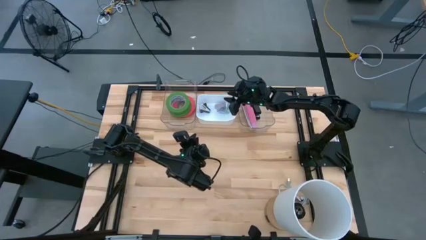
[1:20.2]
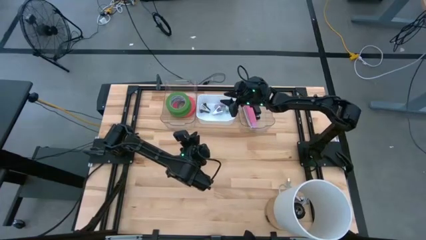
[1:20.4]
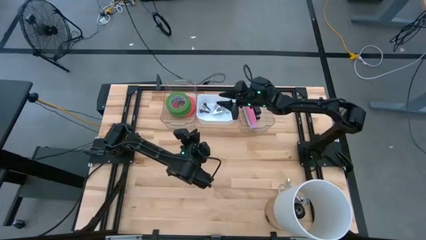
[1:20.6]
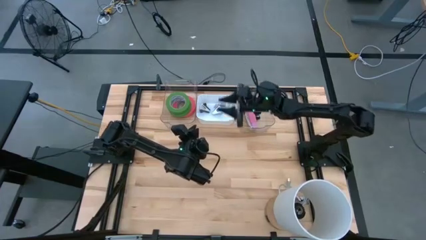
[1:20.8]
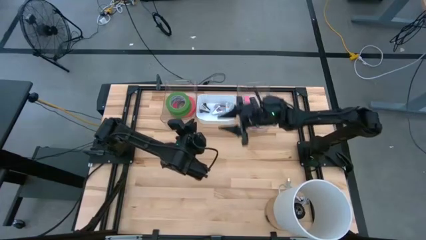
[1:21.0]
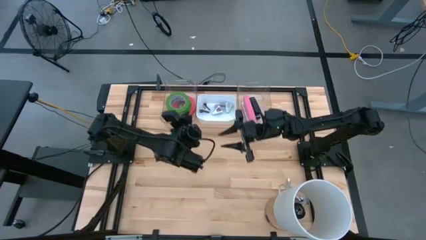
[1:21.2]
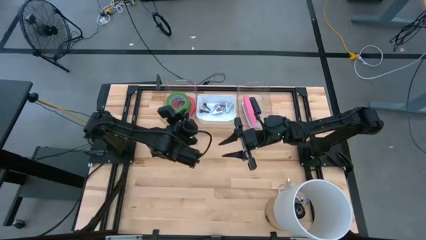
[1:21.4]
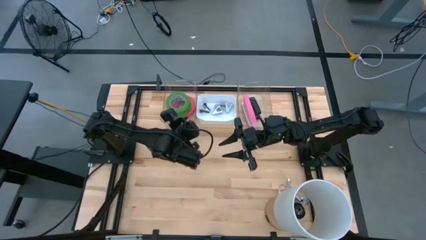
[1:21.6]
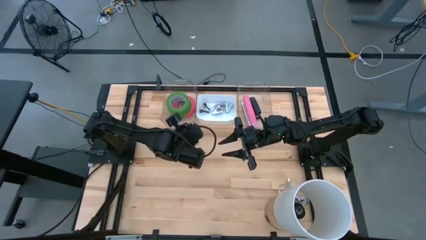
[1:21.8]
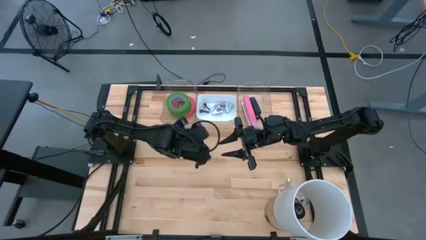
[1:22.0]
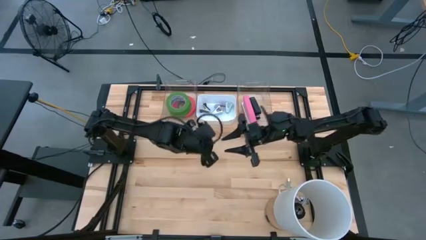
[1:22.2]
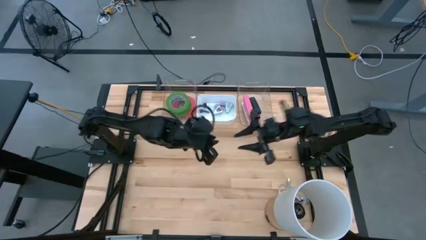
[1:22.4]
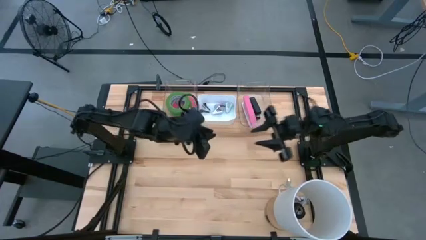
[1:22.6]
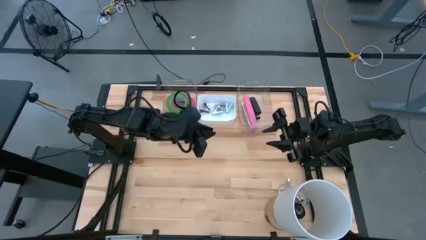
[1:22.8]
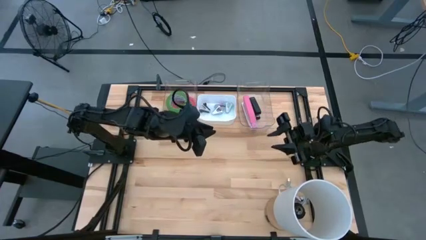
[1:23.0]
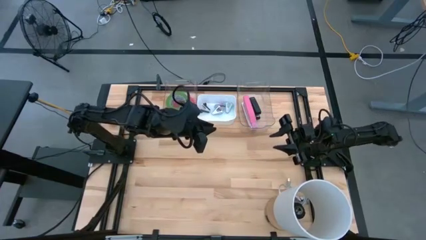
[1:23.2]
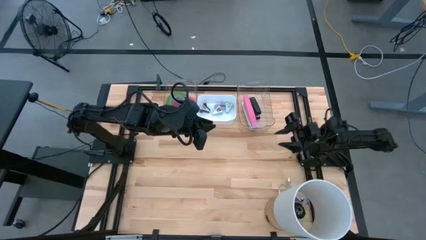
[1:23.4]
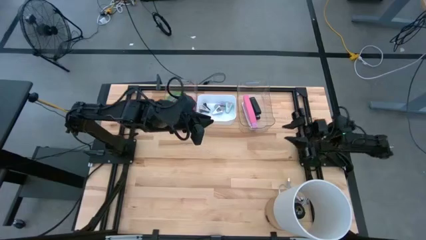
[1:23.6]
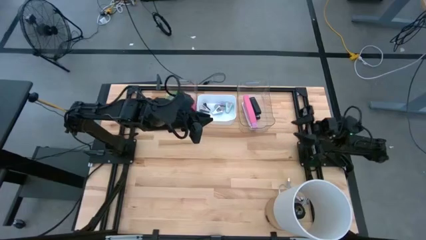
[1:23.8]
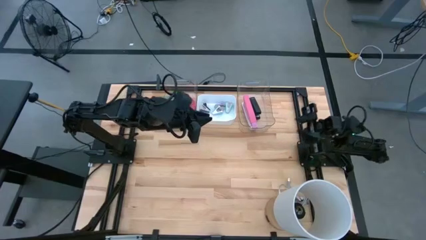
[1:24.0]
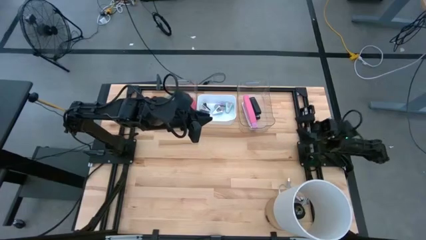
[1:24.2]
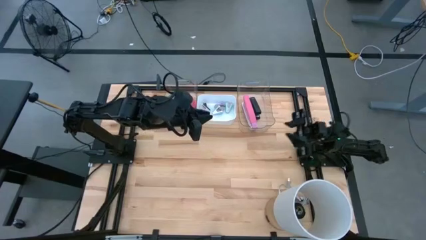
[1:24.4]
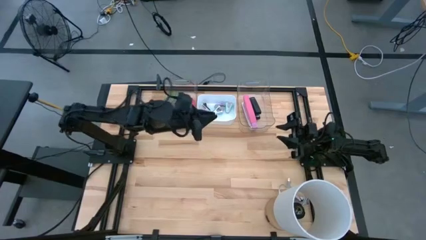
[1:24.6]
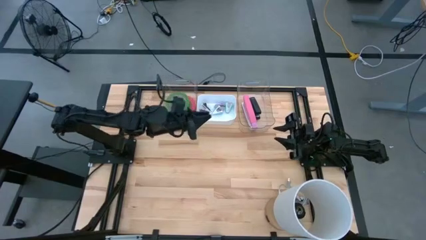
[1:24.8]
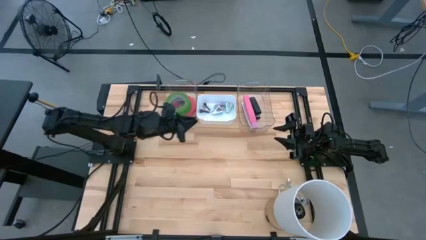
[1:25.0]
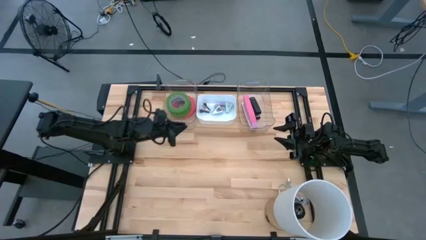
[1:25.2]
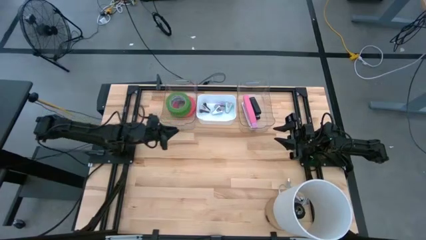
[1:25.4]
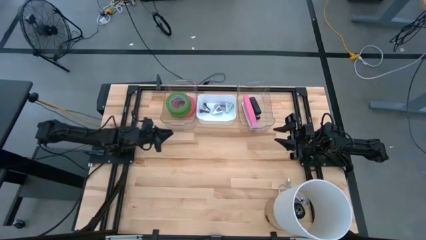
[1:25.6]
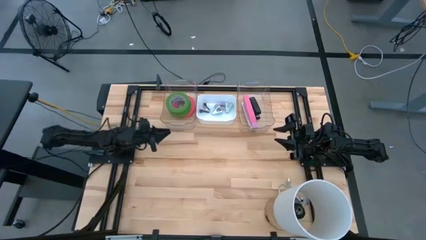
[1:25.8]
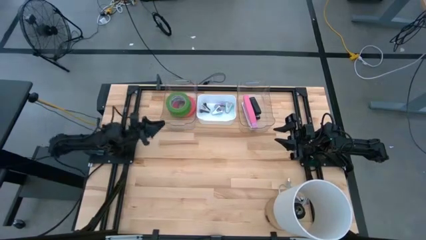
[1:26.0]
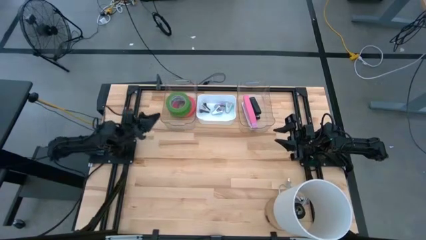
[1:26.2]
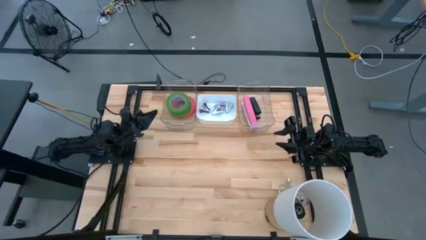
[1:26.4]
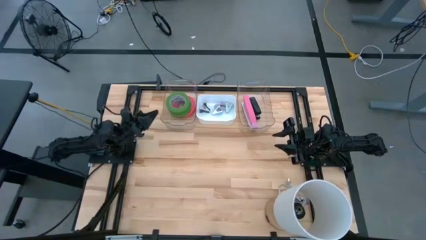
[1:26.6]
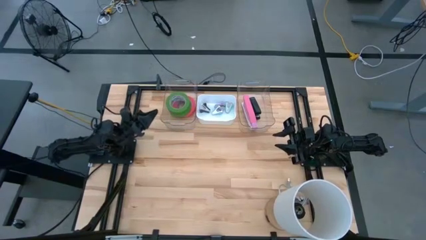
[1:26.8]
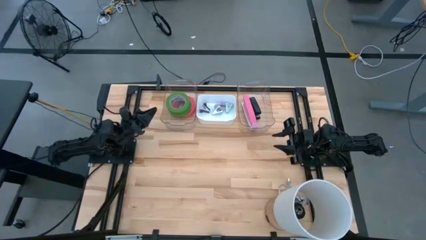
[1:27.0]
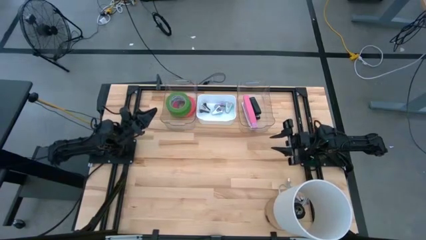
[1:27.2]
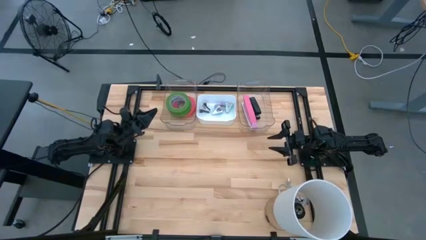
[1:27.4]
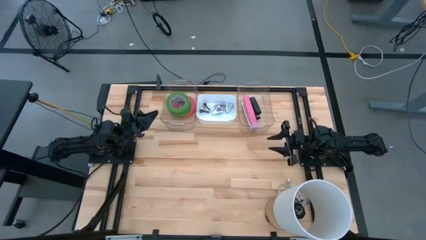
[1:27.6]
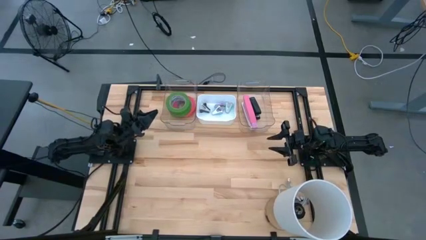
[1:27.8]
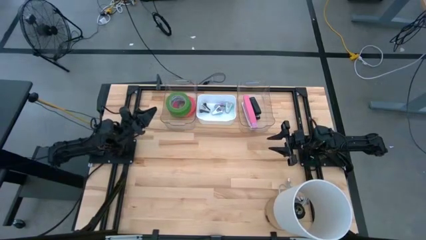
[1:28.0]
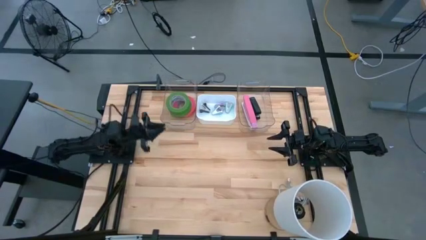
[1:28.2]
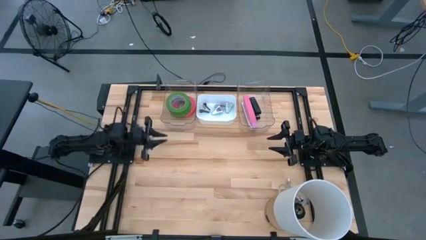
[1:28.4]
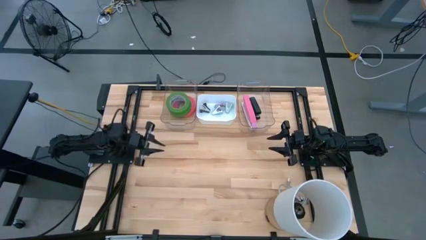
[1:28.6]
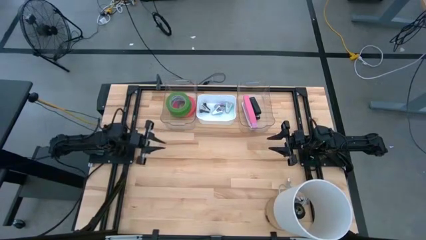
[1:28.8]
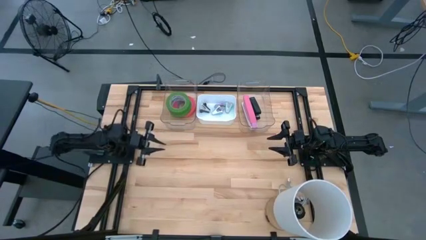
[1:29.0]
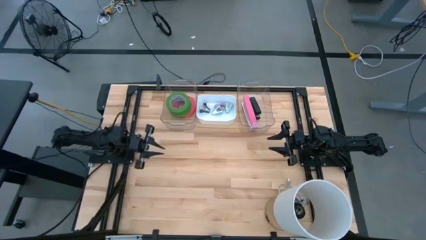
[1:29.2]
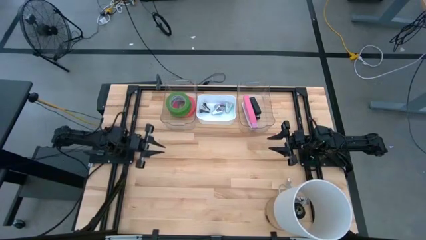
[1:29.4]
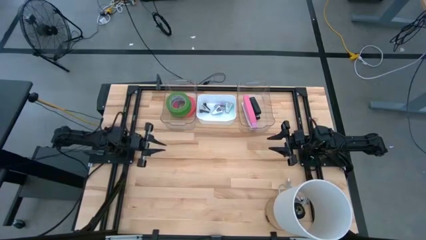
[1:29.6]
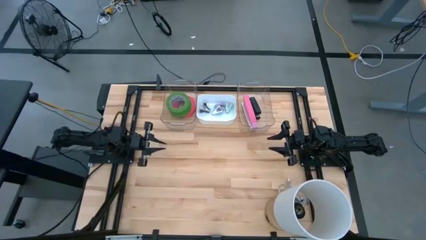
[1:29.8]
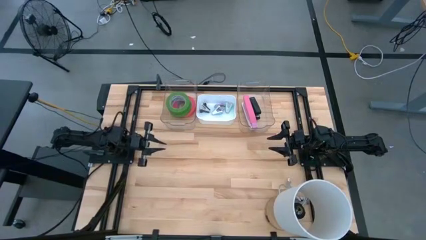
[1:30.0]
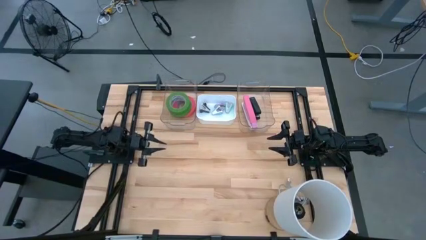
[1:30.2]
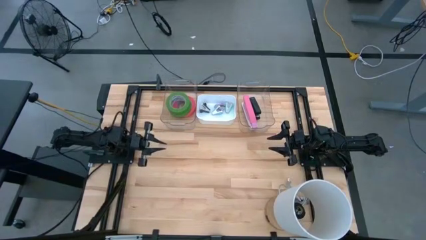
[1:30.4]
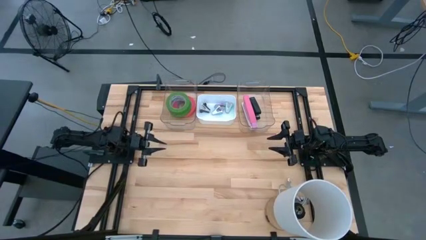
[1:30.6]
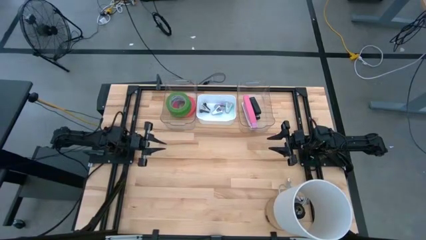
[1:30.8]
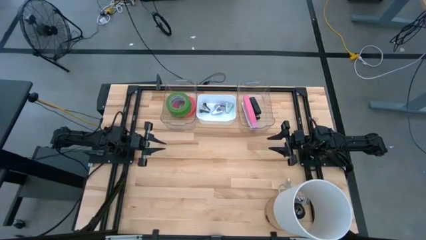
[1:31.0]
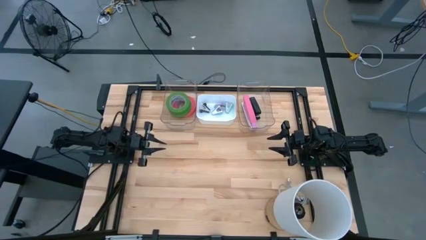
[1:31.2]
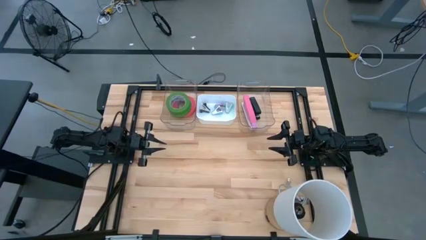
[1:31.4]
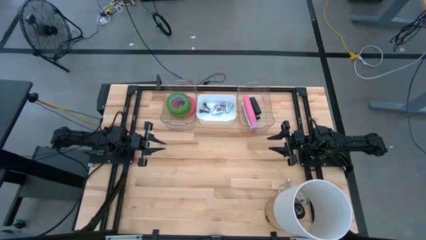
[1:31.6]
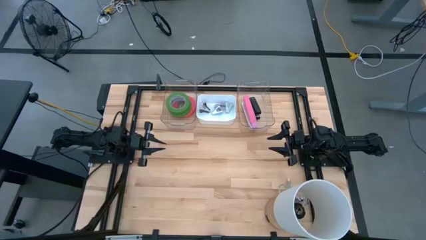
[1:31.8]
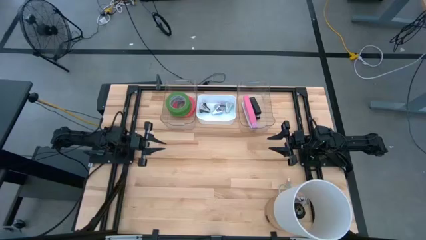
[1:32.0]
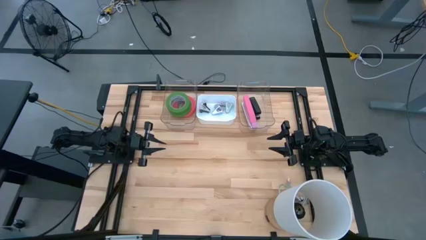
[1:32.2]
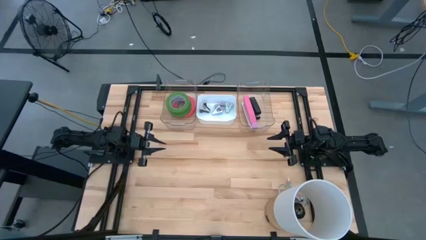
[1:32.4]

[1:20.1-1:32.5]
Task: Pick and place Stapler, Stapler remover, tape
Return to Home Position

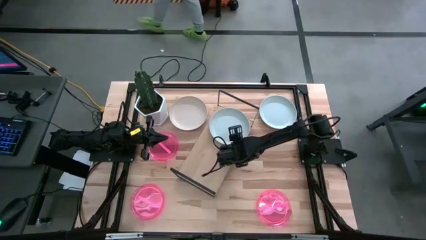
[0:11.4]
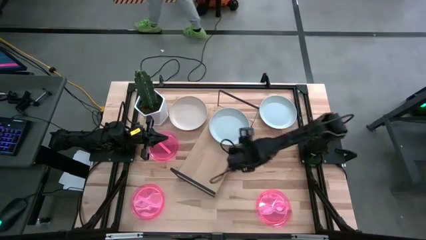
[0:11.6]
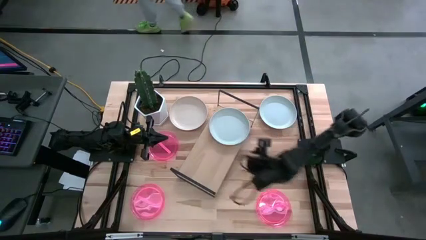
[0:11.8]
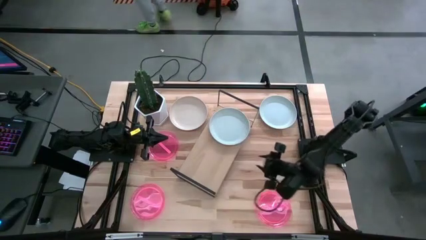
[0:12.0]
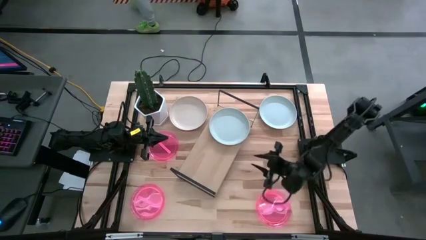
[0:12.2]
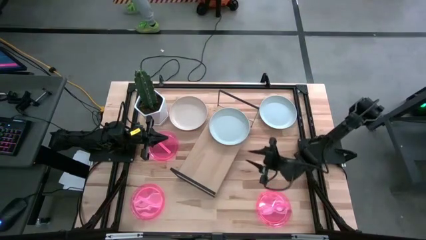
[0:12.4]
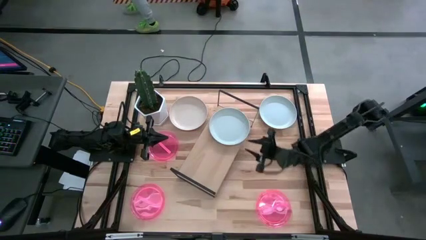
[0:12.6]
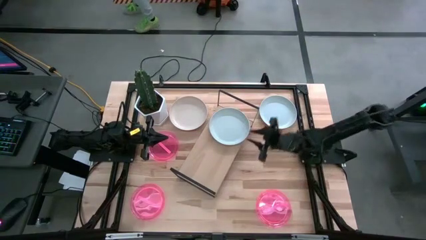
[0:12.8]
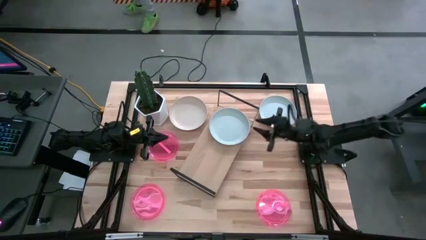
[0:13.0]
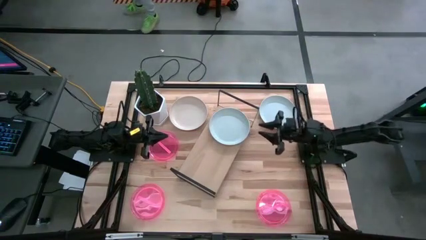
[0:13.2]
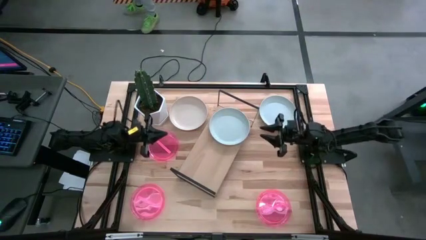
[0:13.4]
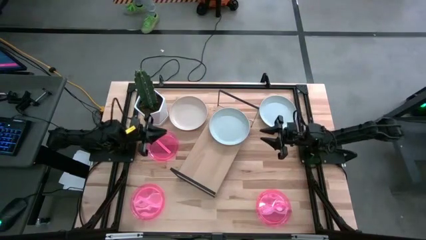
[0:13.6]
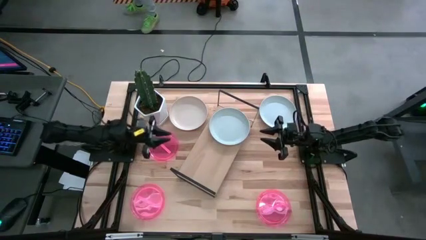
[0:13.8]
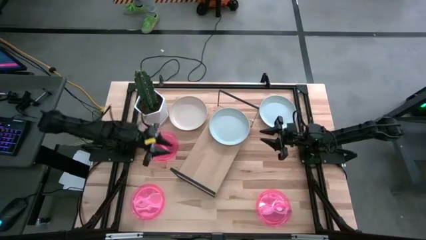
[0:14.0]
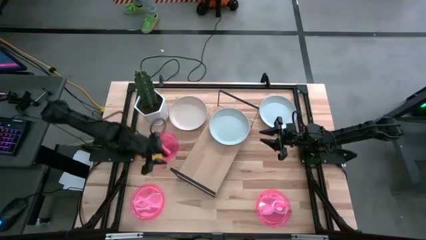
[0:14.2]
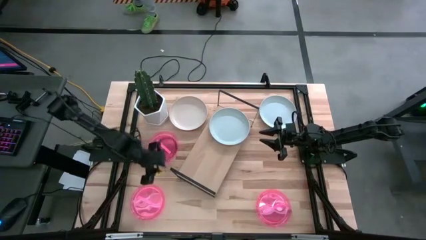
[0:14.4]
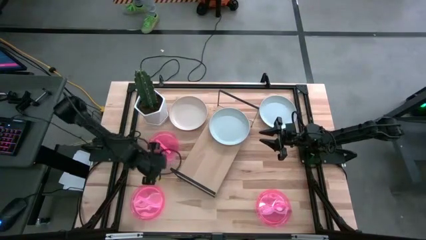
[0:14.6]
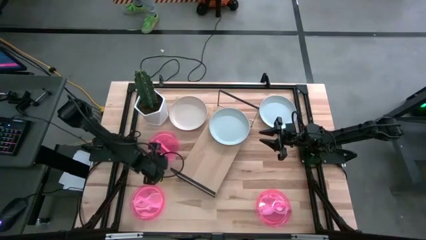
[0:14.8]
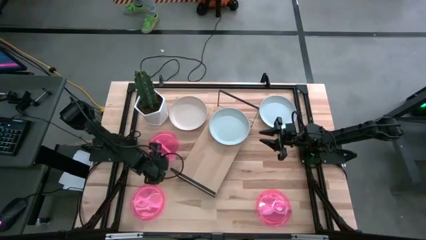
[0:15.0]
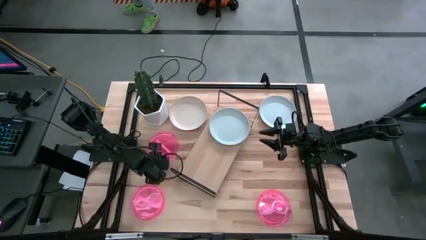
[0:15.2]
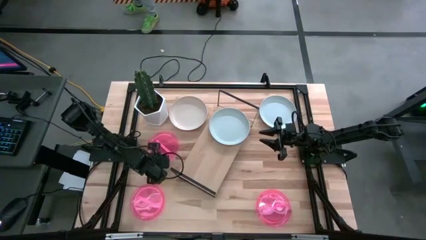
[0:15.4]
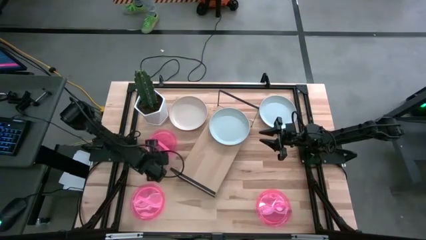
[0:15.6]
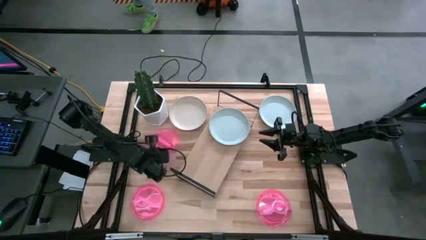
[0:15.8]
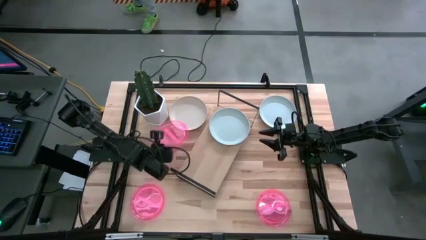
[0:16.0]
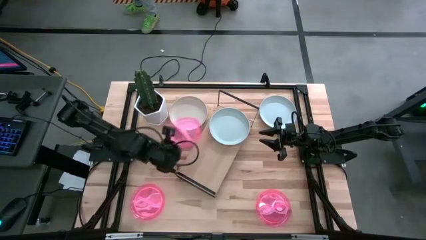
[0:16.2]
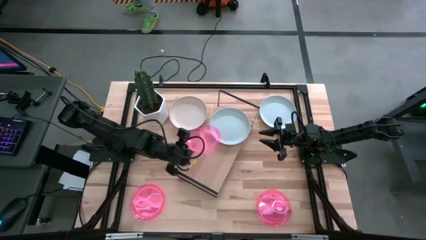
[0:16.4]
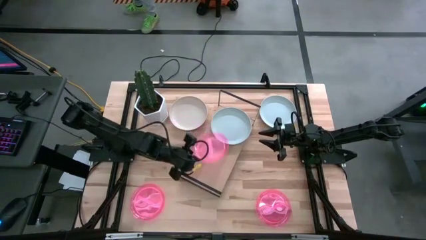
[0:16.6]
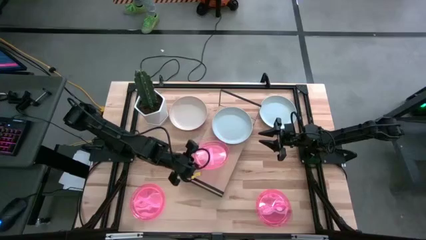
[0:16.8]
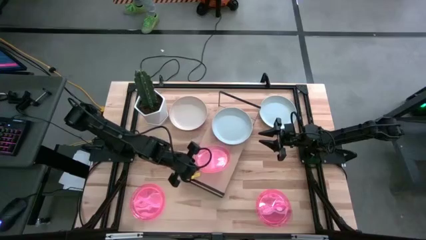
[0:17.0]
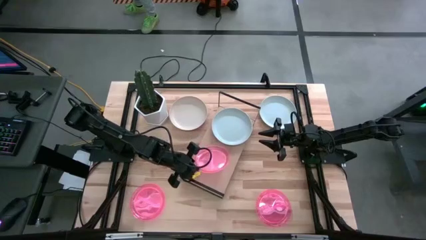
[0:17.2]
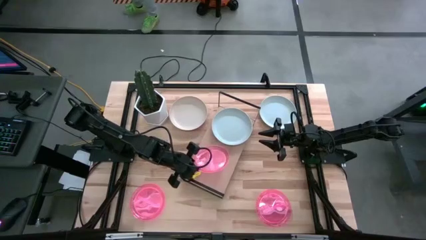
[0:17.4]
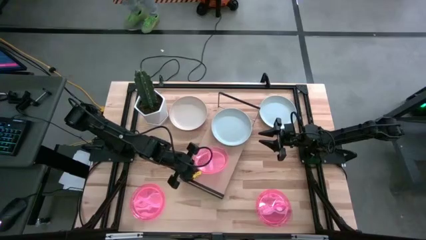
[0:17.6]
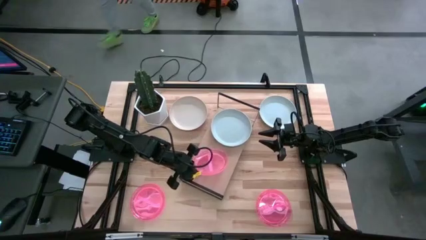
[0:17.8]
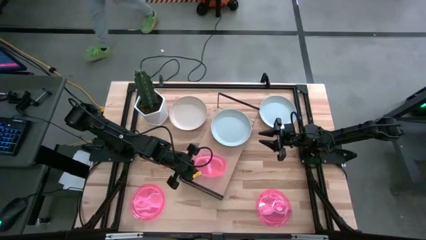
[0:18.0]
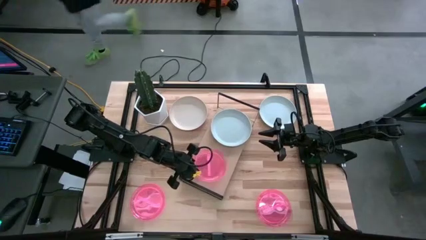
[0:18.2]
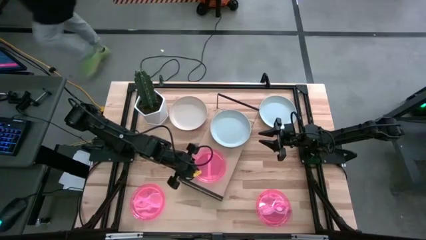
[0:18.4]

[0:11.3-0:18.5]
Task: Place and stack plates onto a shelf
Put the top left pink plate on the shelf
